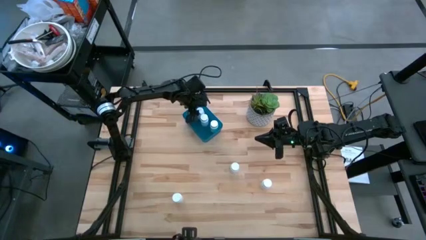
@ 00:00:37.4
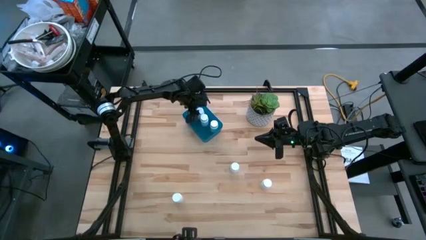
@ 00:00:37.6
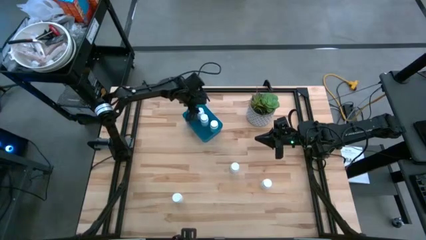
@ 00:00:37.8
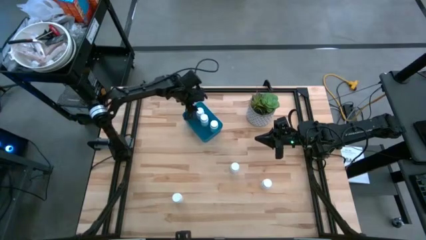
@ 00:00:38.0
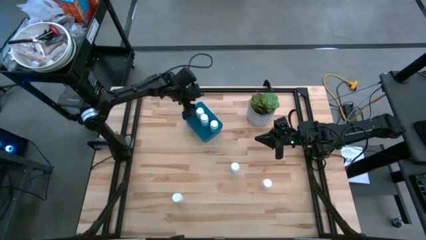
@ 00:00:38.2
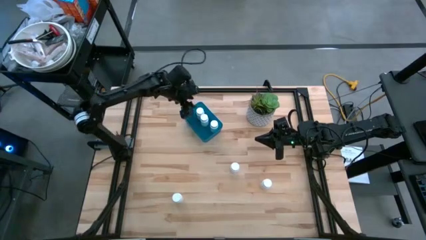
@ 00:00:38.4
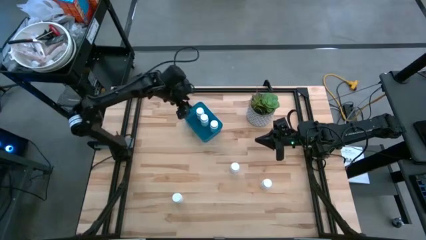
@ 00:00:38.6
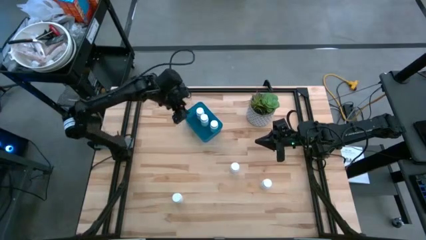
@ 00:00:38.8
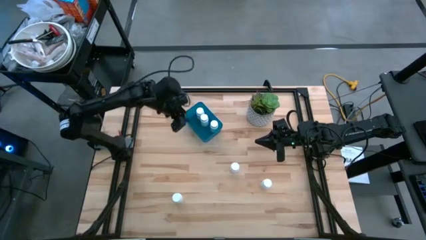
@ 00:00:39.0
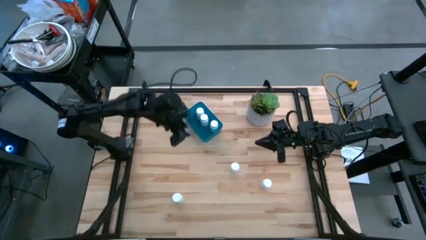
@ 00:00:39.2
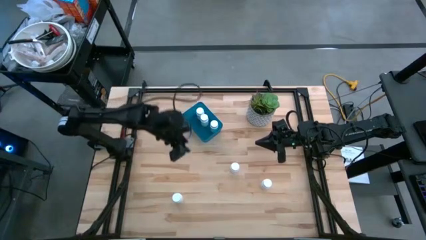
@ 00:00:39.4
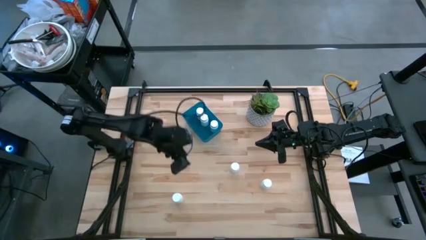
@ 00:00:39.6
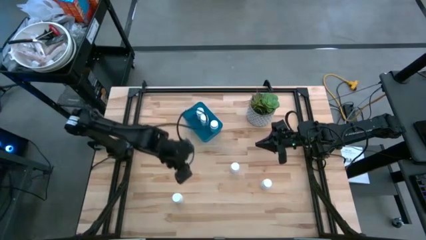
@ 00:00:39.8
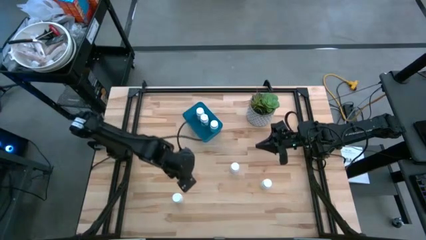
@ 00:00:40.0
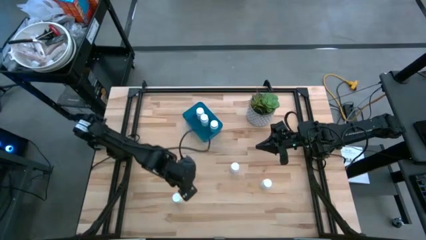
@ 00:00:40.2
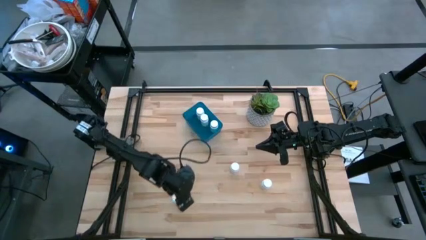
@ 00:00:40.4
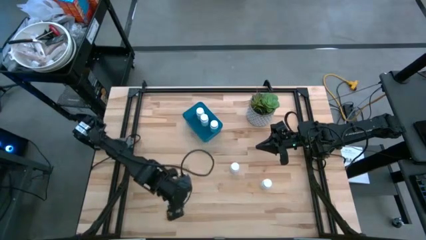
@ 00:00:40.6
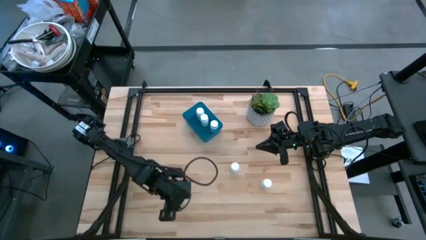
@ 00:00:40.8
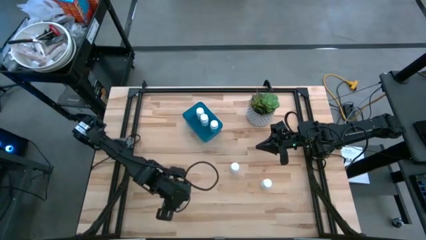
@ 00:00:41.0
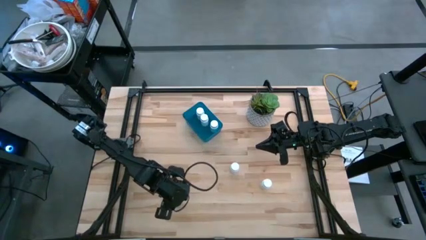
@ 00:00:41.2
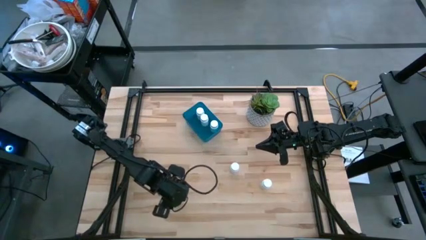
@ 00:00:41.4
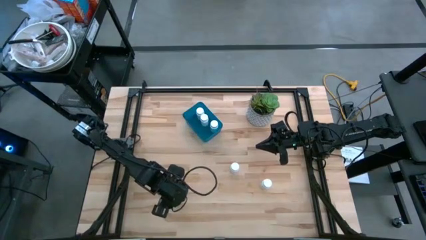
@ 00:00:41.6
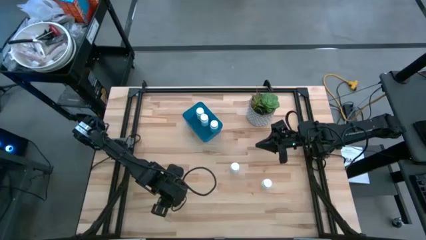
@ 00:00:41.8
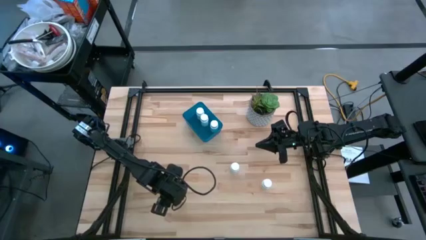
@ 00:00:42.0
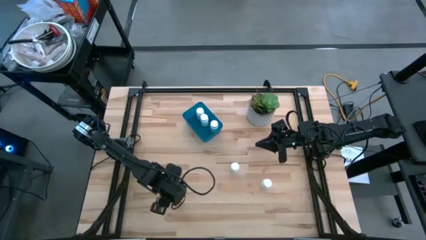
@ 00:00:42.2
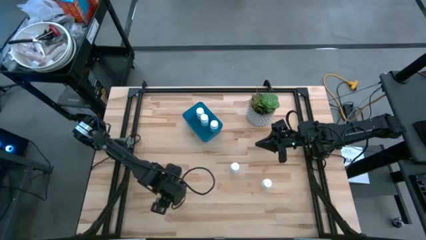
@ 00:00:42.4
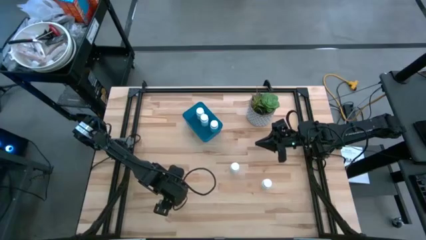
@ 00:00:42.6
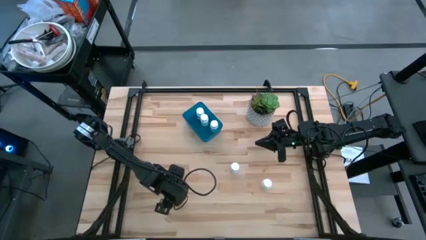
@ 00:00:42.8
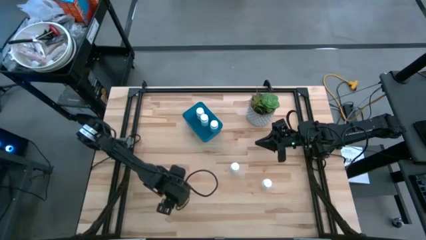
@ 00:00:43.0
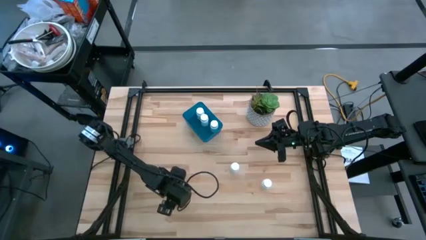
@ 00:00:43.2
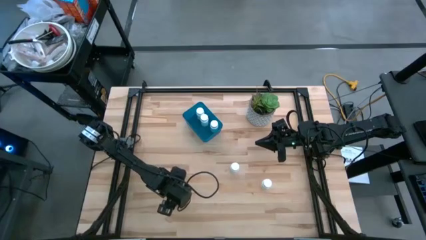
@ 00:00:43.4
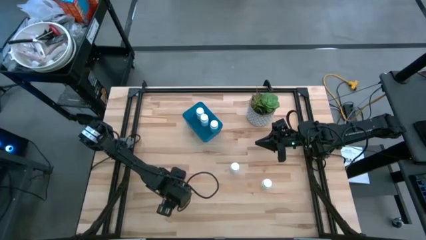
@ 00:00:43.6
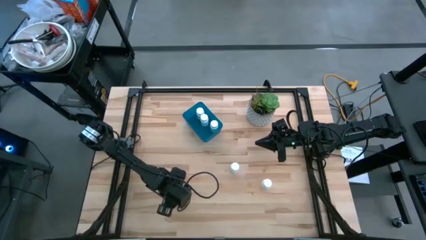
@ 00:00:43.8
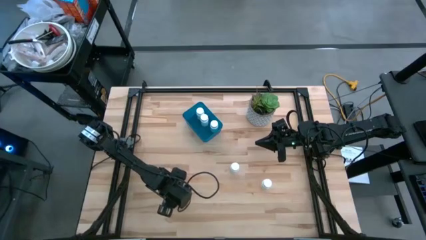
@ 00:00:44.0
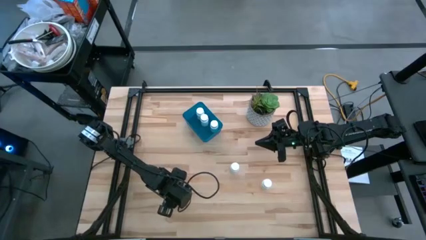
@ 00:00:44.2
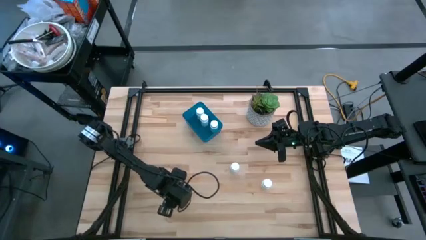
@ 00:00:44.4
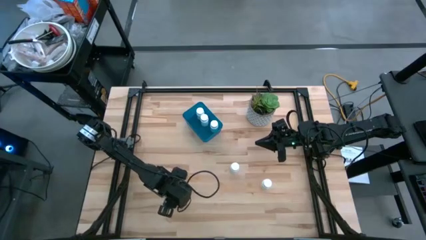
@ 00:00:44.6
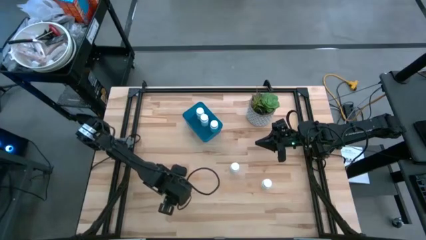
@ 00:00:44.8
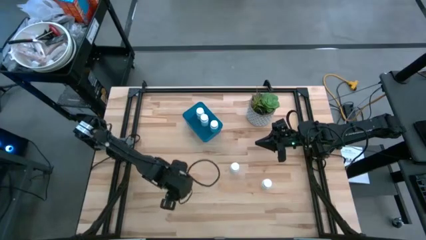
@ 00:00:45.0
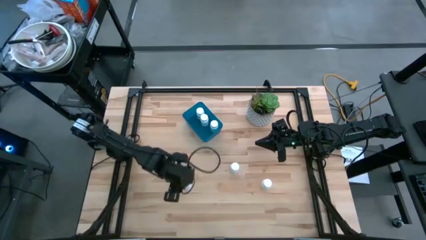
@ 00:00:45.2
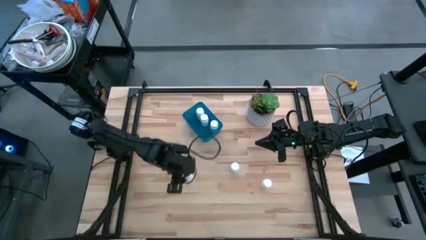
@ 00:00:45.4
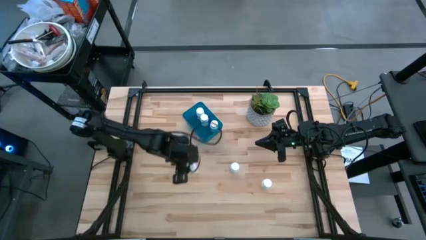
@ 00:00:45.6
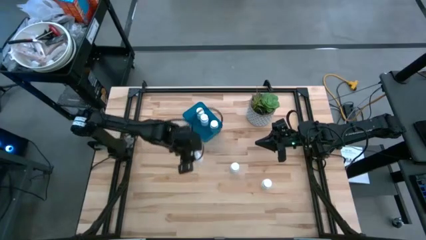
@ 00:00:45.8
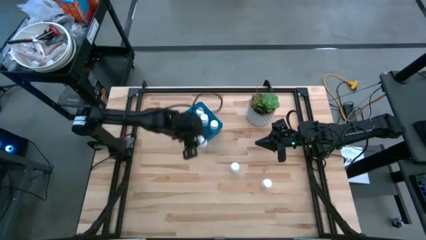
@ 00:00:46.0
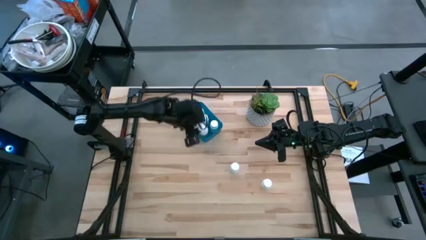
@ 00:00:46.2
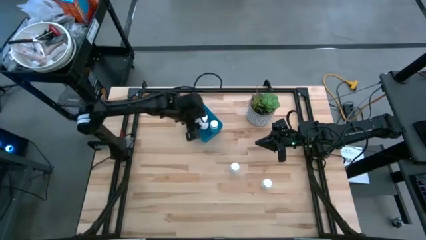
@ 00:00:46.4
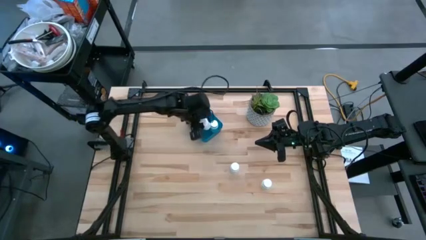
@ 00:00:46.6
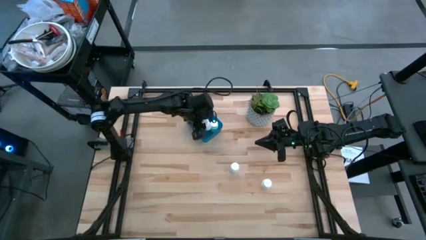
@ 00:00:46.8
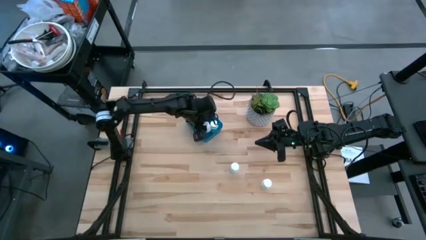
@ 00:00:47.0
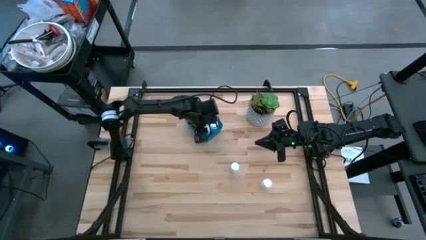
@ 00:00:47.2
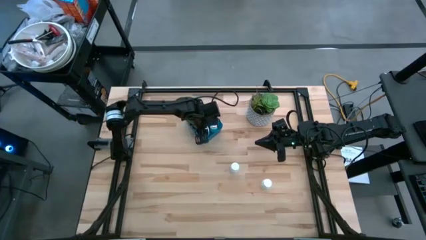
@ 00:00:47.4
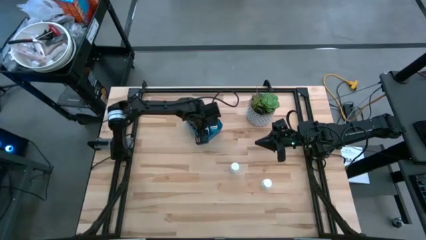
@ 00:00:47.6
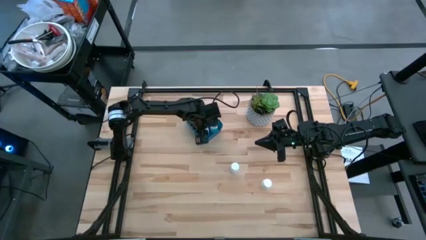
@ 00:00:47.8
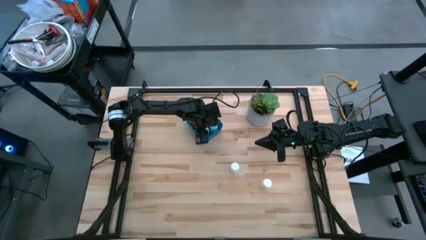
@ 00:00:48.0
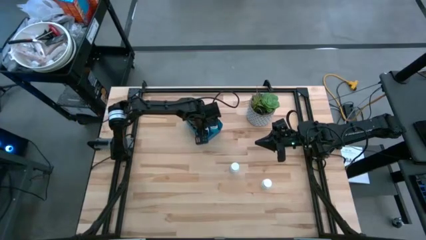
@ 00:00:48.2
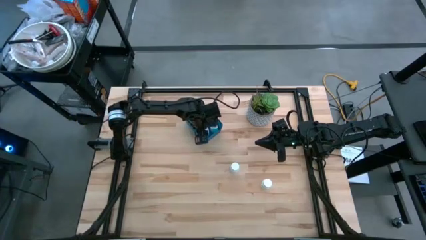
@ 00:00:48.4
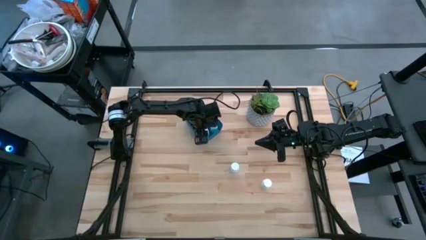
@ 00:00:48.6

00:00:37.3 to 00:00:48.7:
Task: Pick and place pill bottles into a basket
Put the white pill bottle into the dark blue bin
